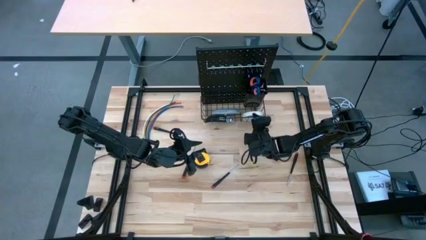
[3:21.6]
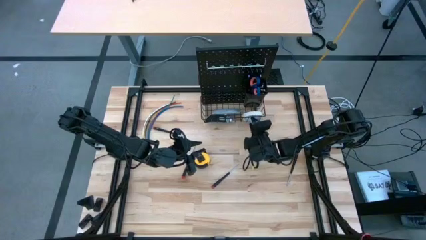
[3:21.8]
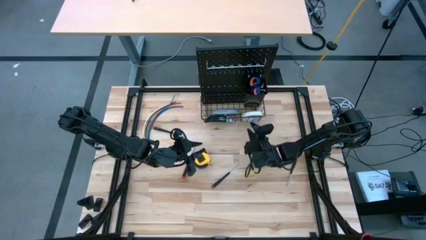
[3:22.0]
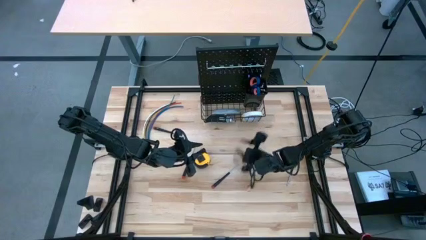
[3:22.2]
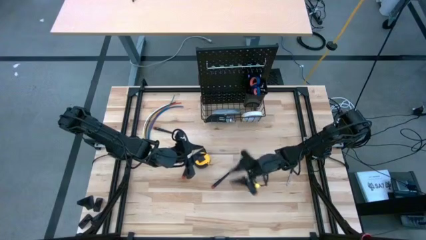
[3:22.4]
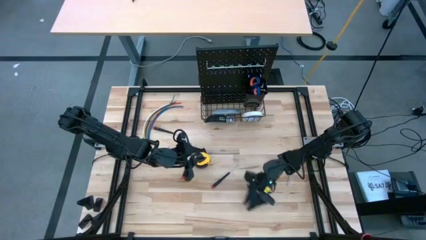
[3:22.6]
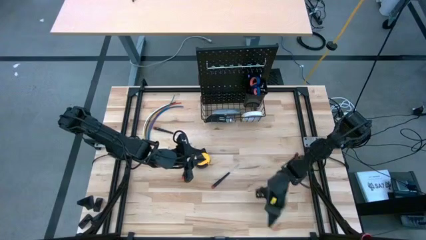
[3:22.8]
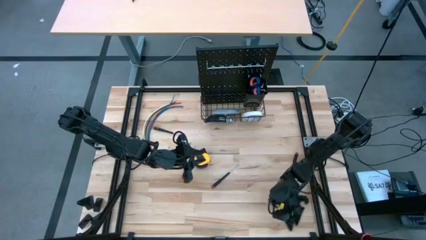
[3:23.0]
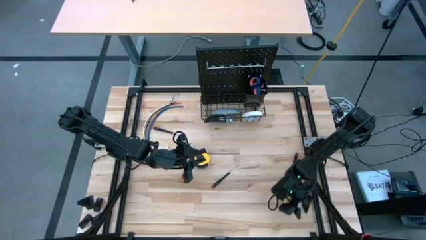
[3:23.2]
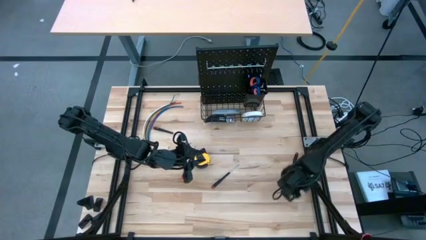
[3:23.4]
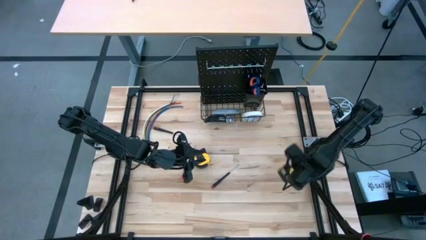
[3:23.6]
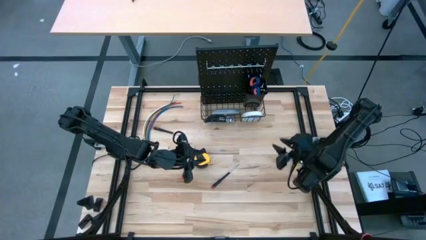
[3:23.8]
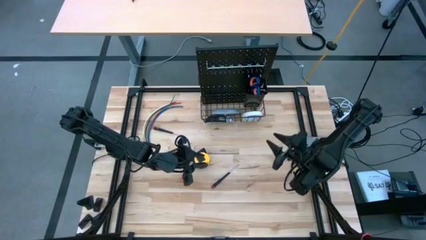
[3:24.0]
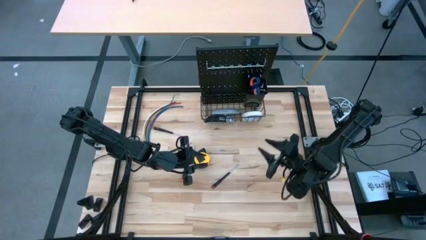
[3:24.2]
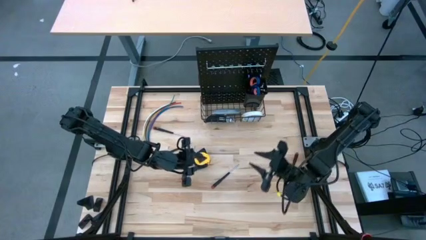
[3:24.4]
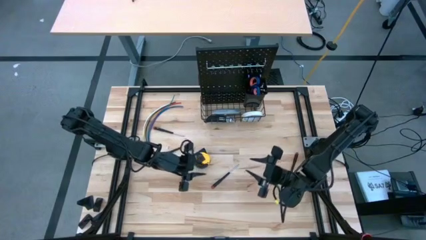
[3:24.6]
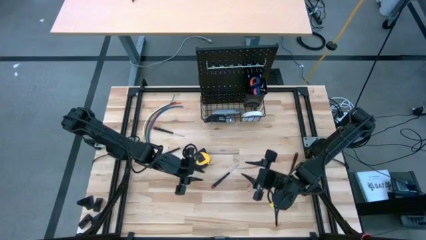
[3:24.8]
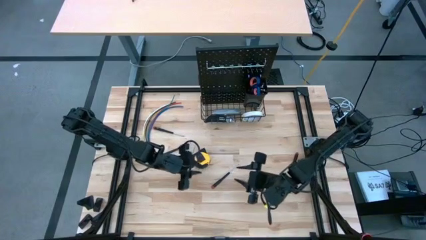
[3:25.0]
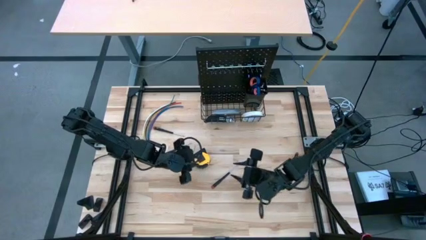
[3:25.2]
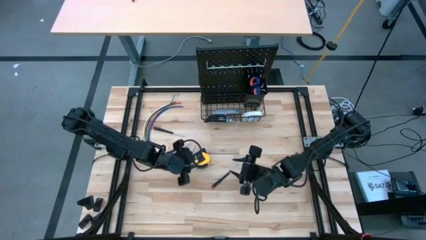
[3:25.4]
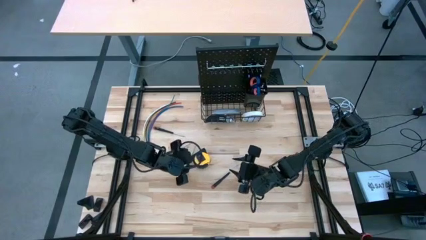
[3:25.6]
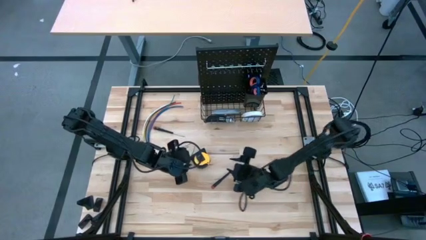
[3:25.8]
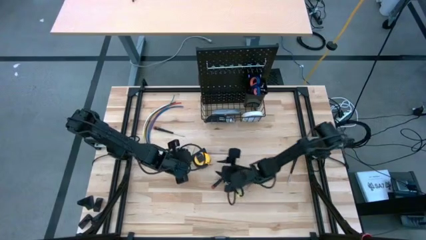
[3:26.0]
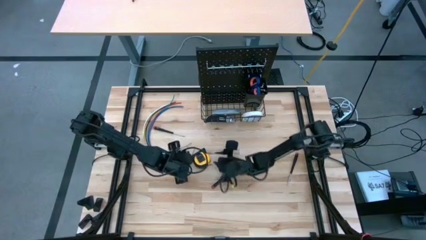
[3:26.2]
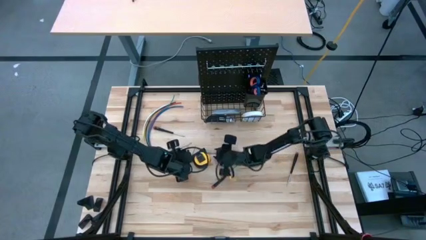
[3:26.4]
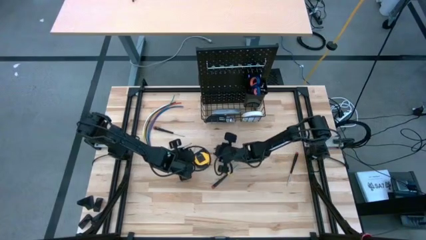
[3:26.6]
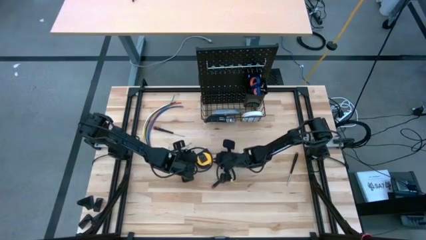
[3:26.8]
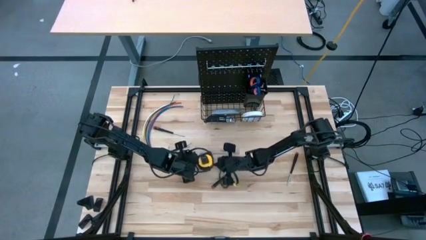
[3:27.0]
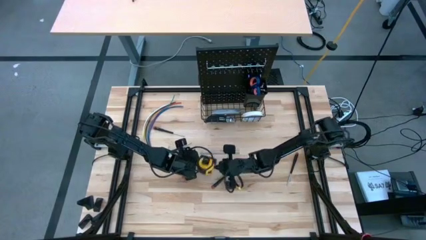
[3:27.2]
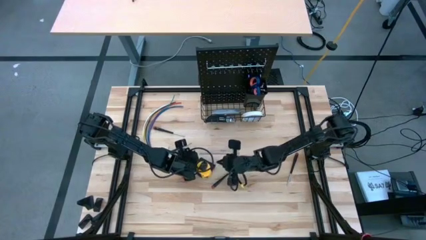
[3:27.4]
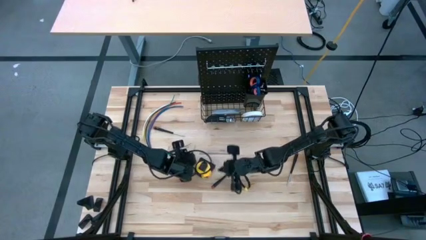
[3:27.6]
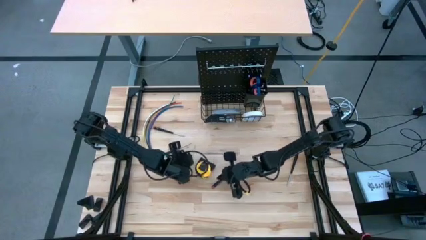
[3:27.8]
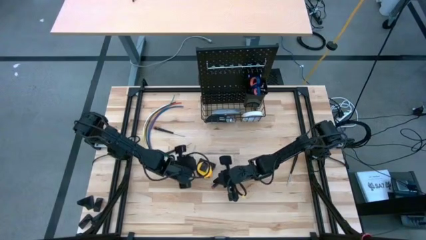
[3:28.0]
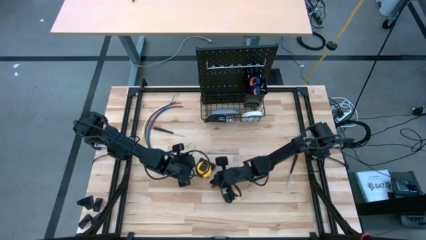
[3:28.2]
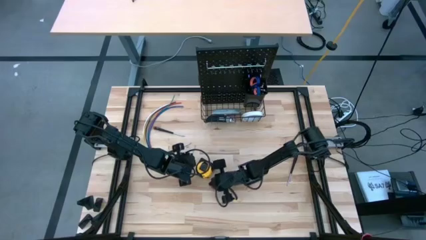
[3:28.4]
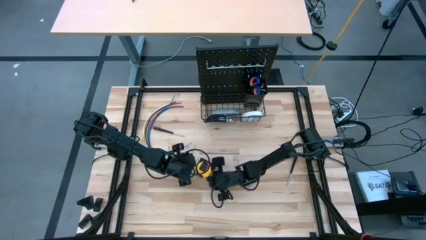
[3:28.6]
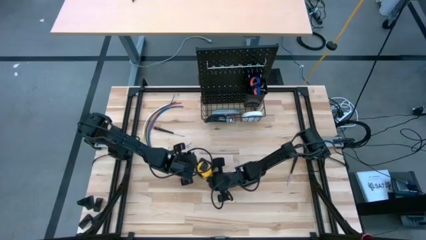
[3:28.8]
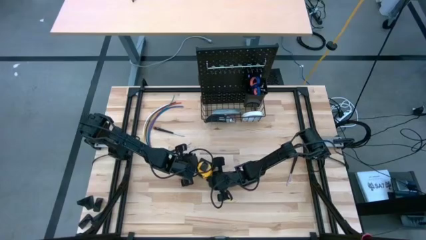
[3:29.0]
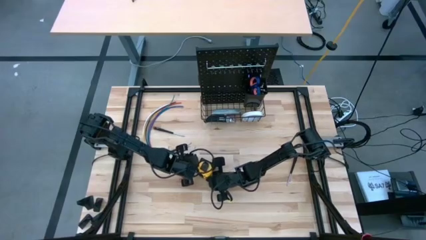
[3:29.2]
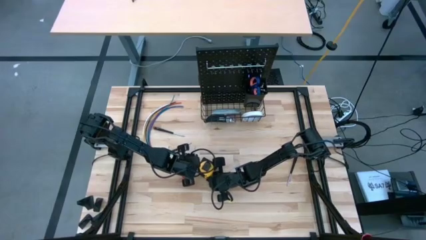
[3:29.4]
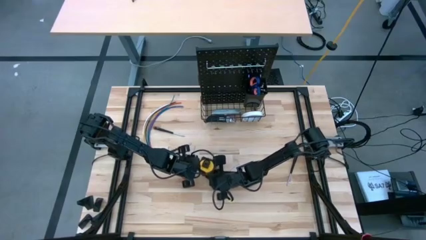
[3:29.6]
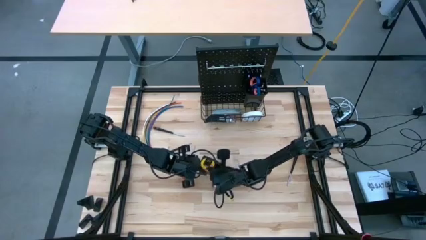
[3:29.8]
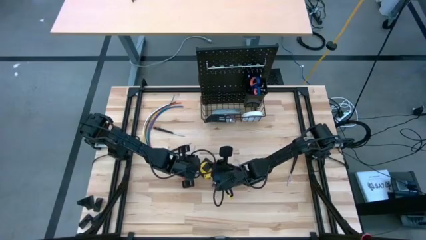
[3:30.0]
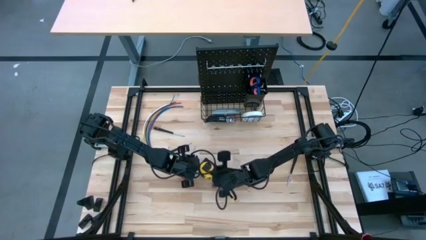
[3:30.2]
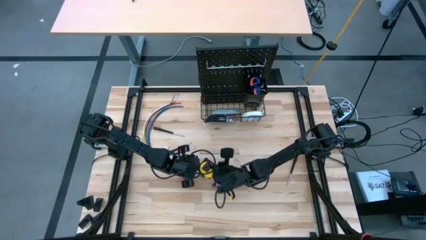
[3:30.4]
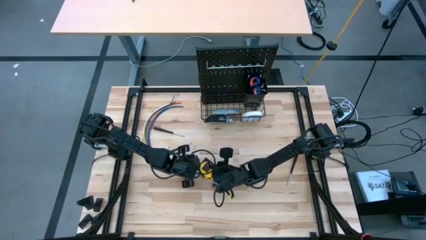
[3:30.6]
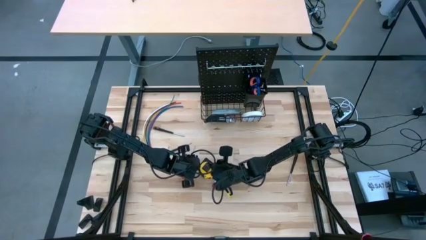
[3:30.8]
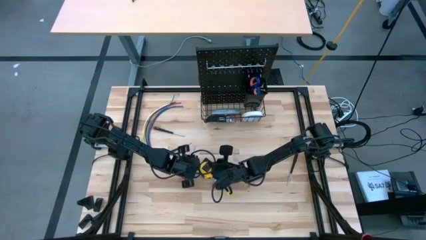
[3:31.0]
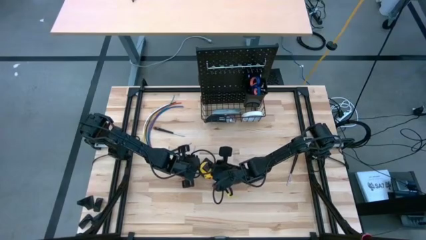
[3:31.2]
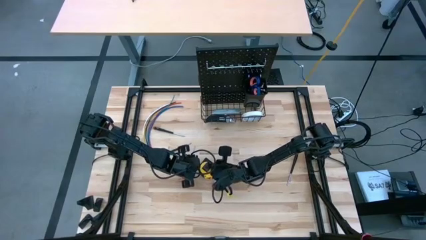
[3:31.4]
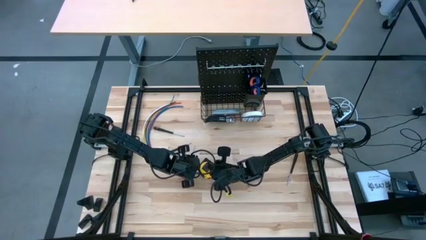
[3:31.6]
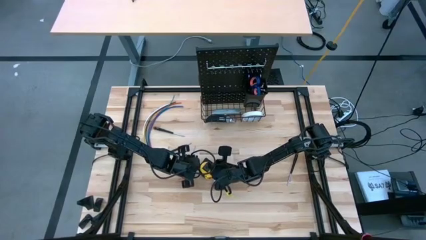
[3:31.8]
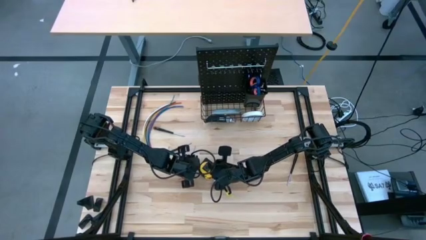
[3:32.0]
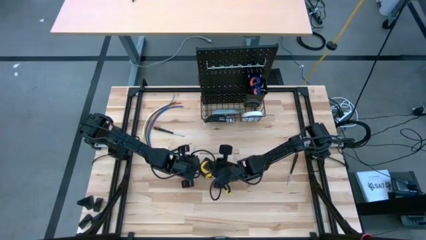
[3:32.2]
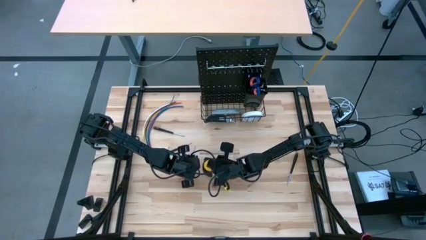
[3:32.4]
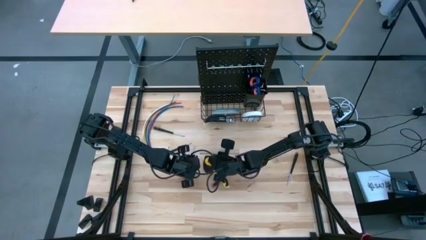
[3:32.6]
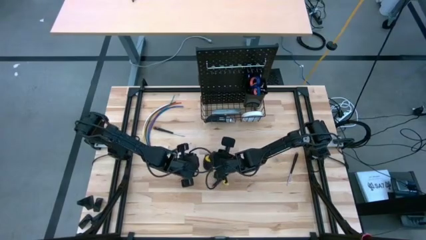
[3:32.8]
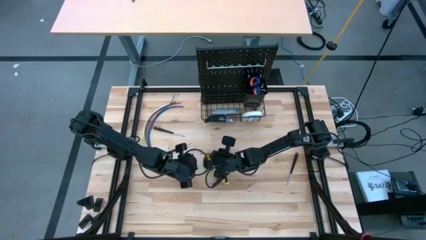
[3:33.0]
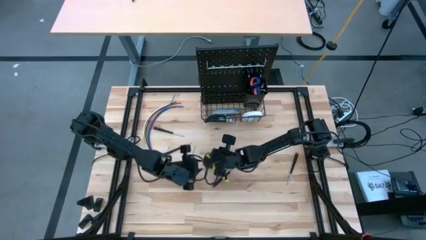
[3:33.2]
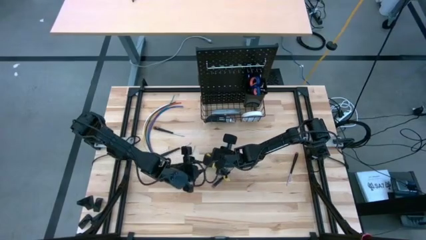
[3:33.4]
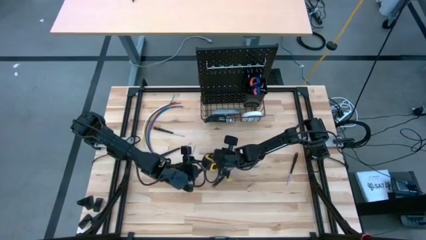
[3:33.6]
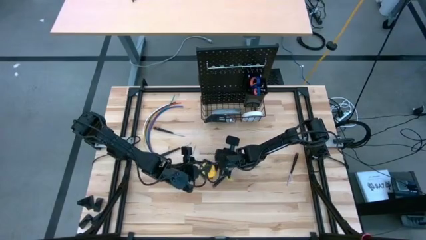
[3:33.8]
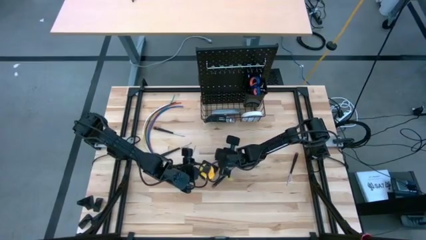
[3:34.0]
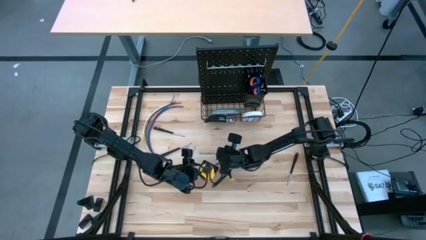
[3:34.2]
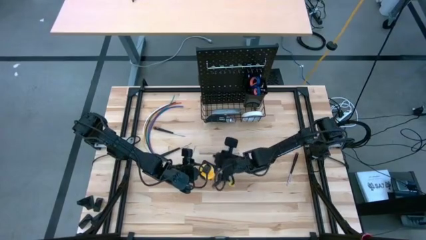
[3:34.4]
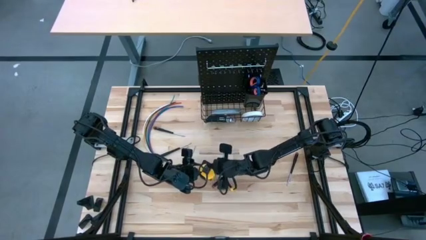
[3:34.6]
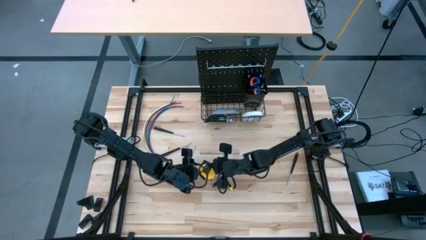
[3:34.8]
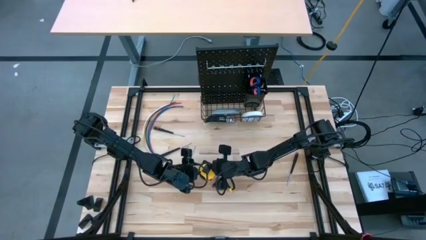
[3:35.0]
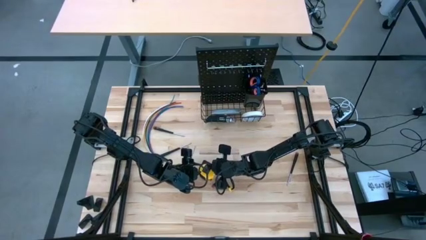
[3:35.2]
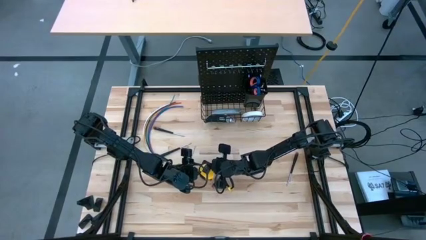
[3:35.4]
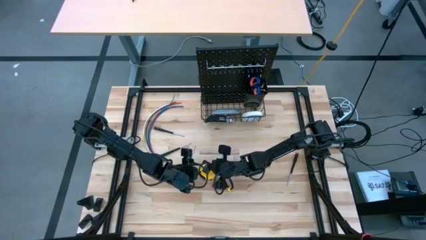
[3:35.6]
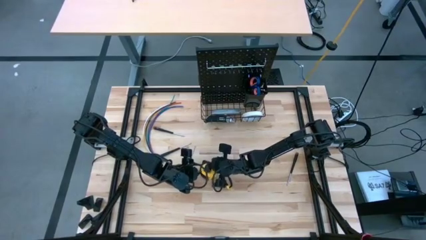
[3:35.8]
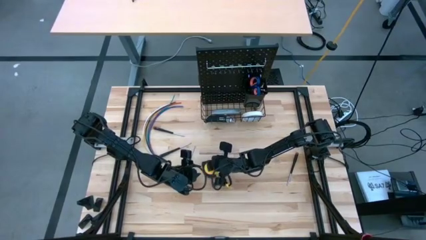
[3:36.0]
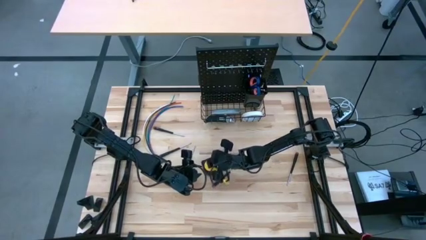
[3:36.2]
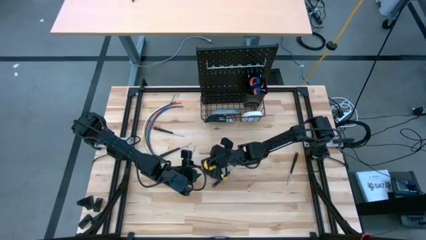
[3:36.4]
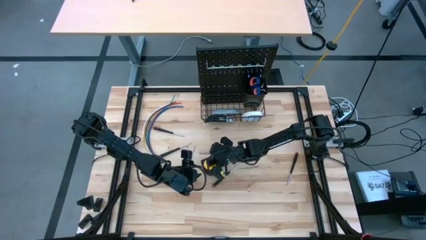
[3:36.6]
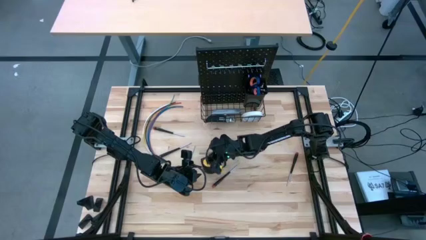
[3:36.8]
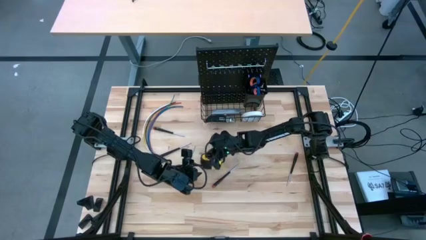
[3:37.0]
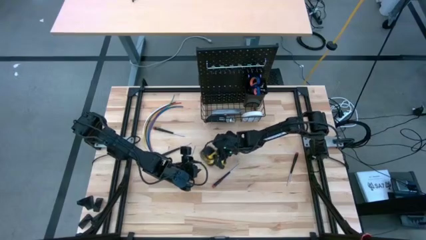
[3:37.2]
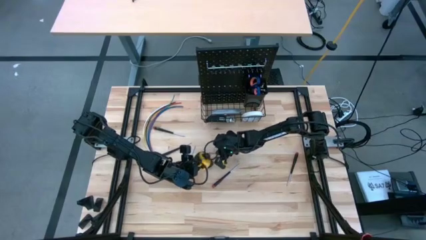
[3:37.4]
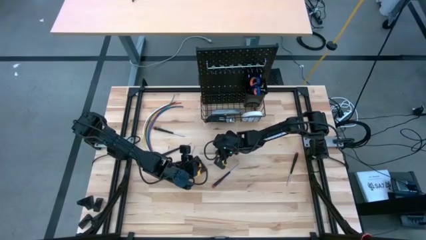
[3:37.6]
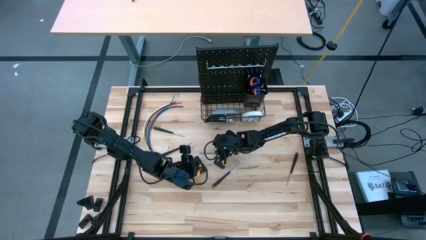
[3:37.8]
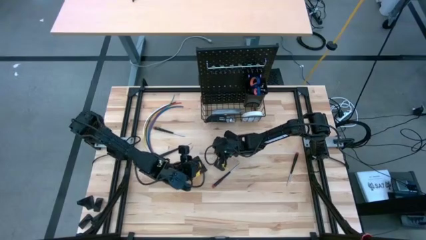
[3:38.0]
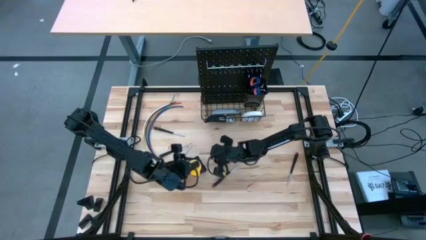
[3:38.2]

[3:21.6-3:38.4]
Task: Hang tools onto peg board
Hang the yellow tape measure on the pegboard
